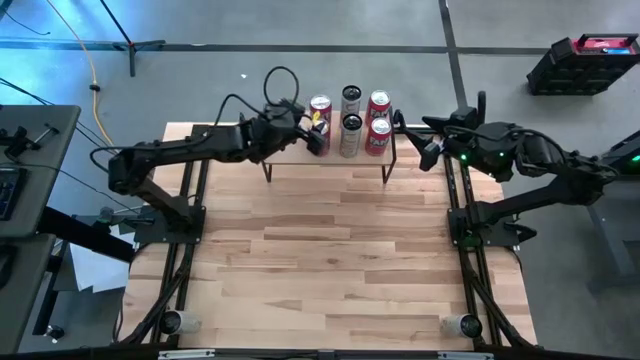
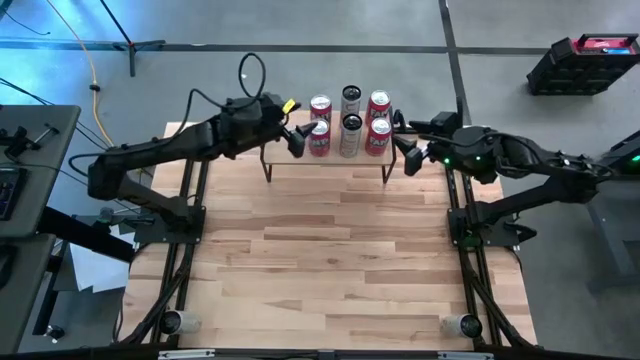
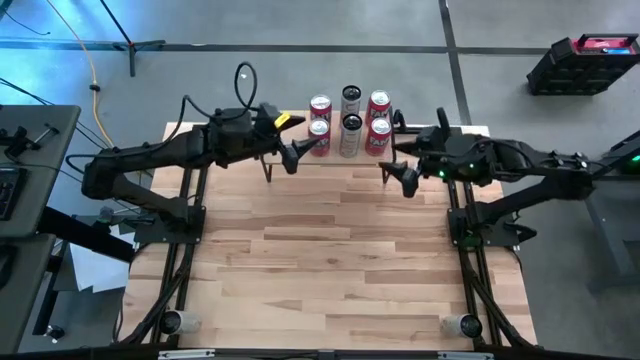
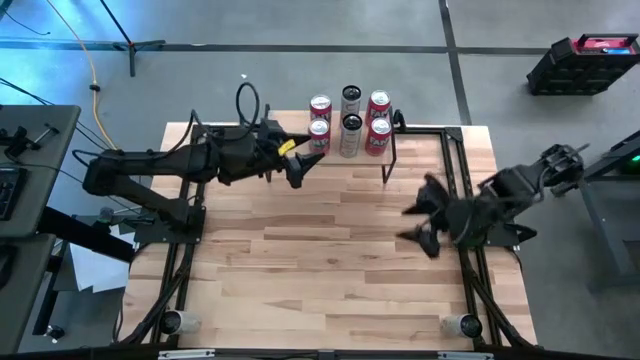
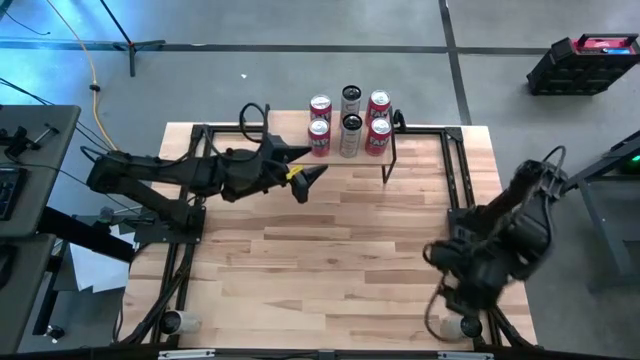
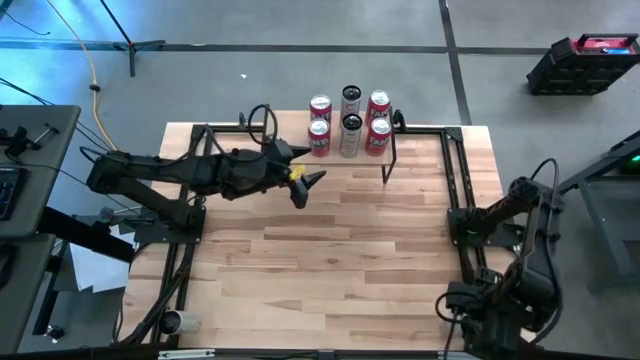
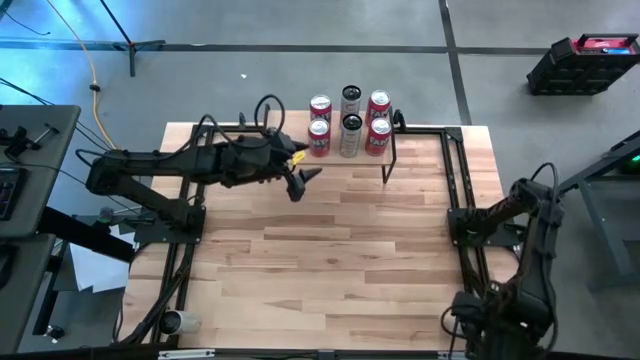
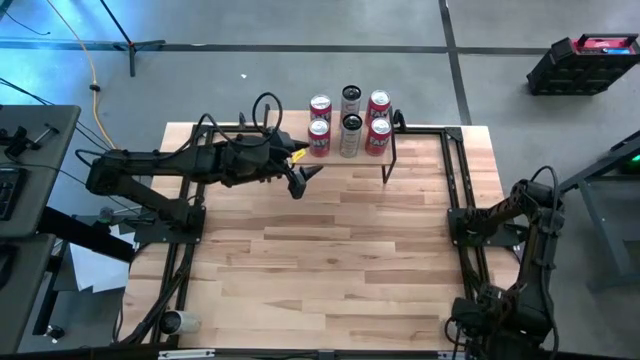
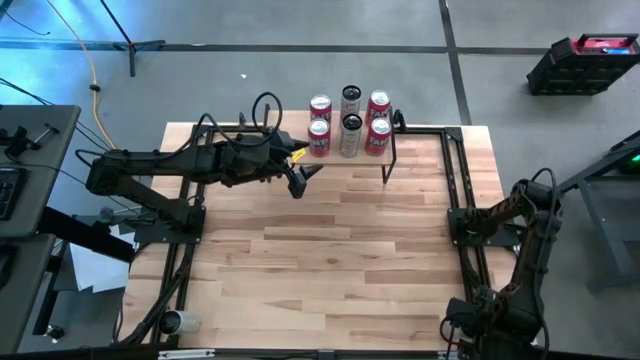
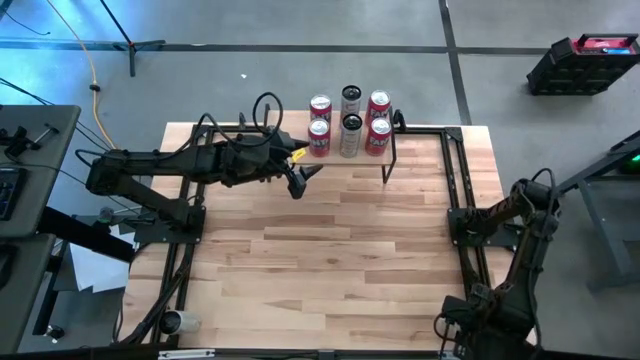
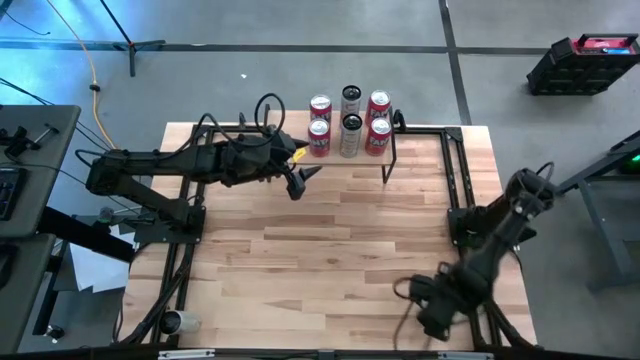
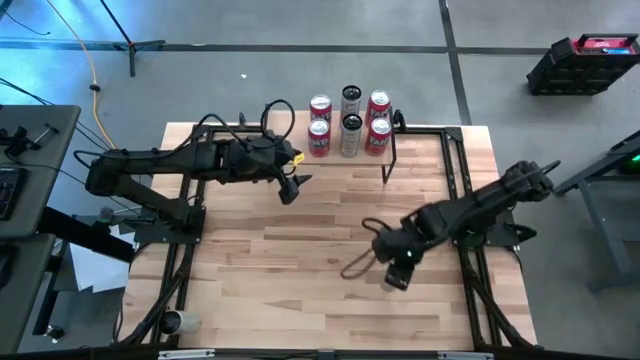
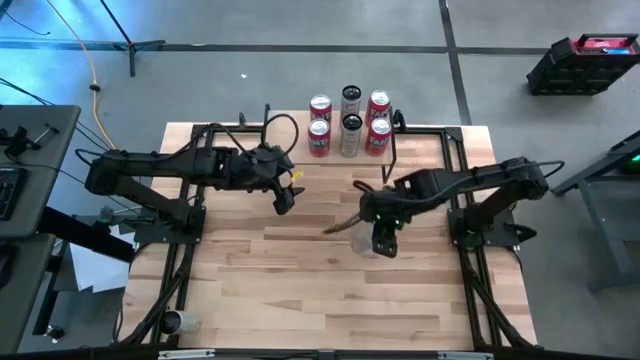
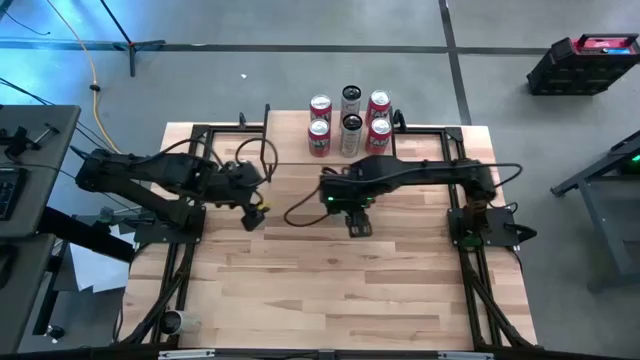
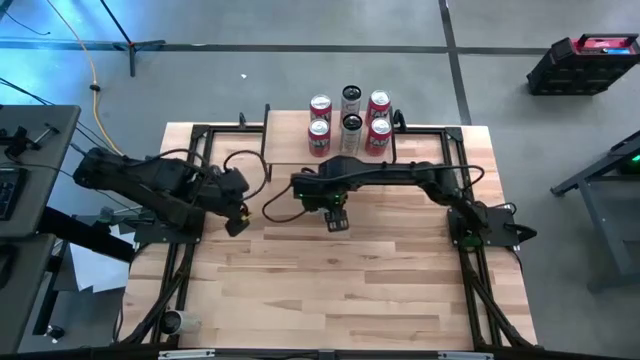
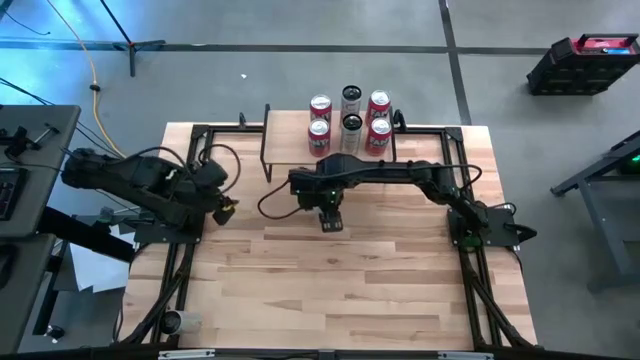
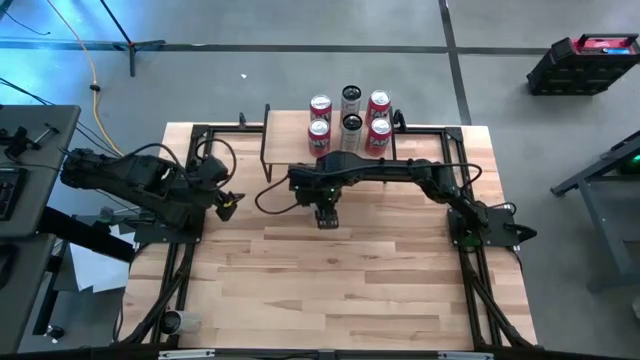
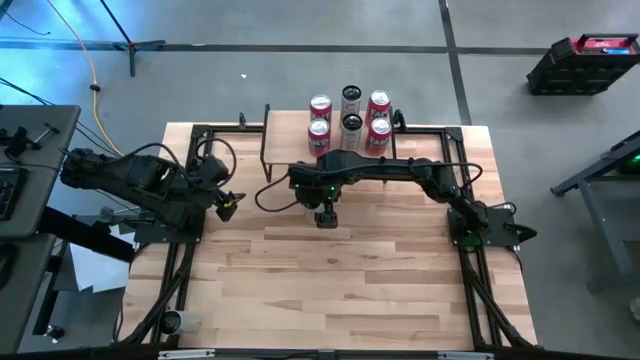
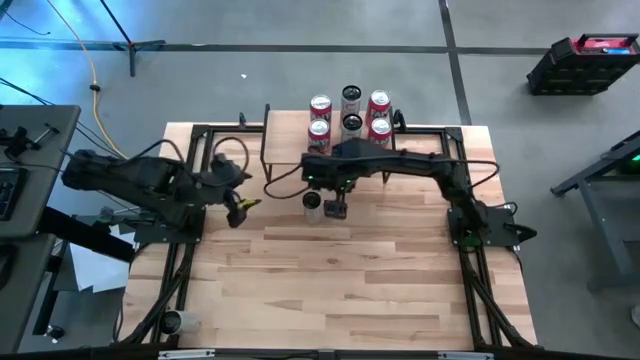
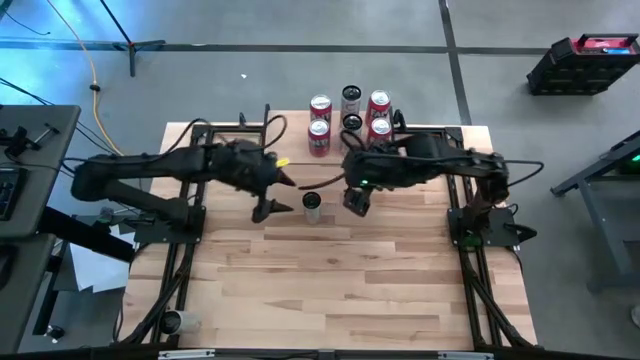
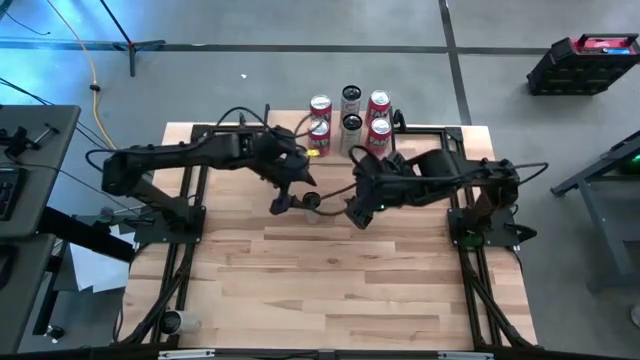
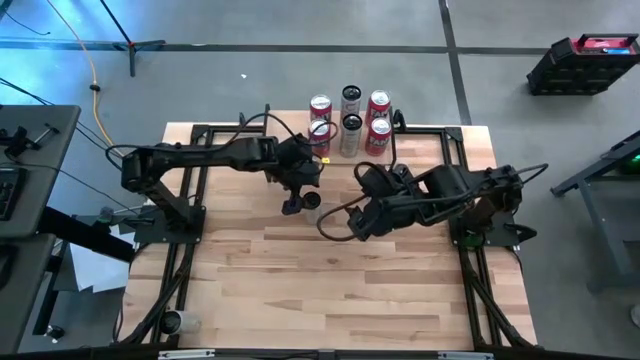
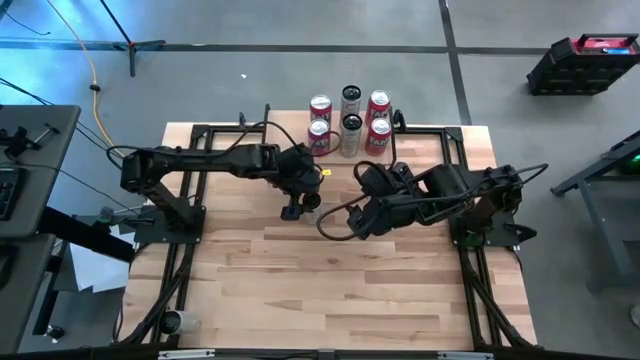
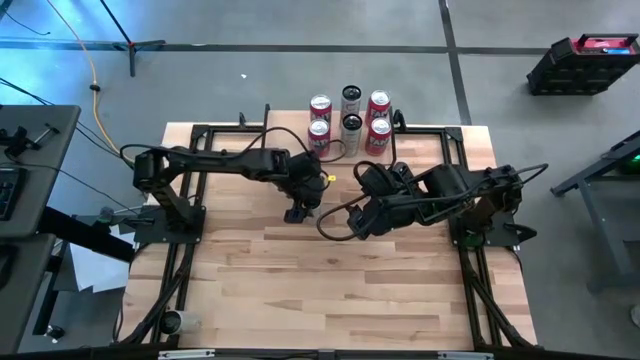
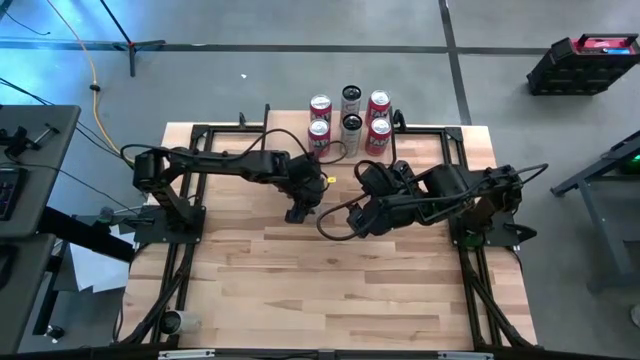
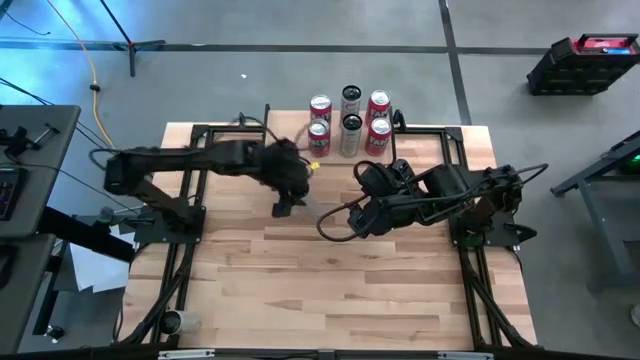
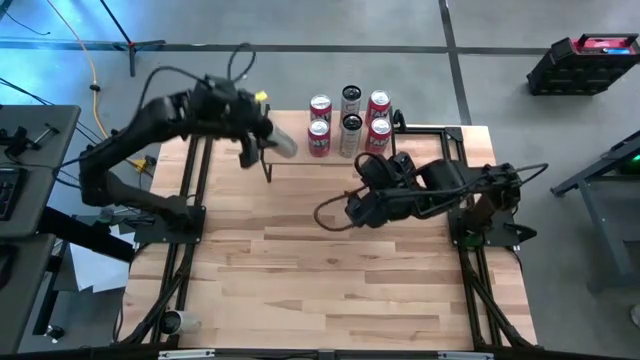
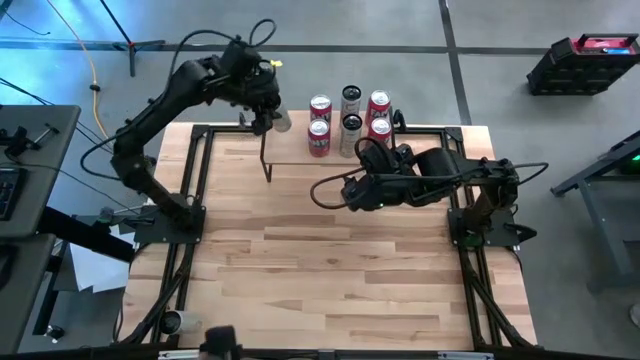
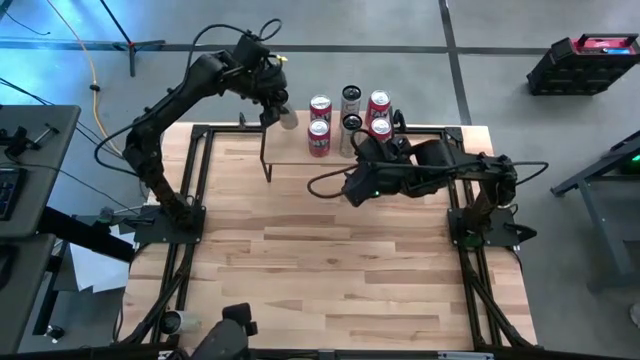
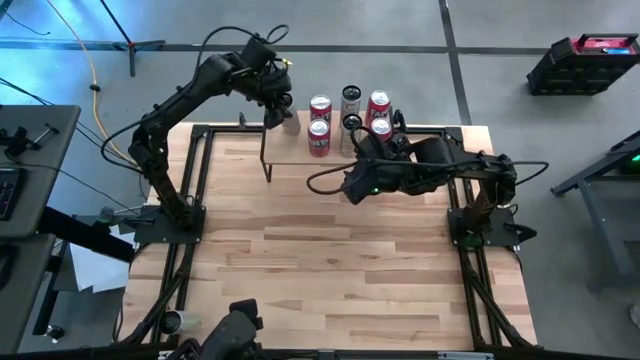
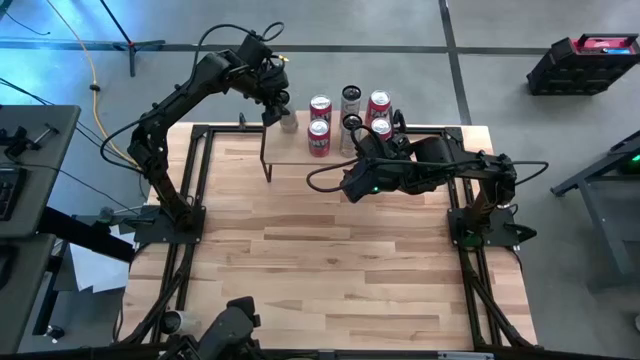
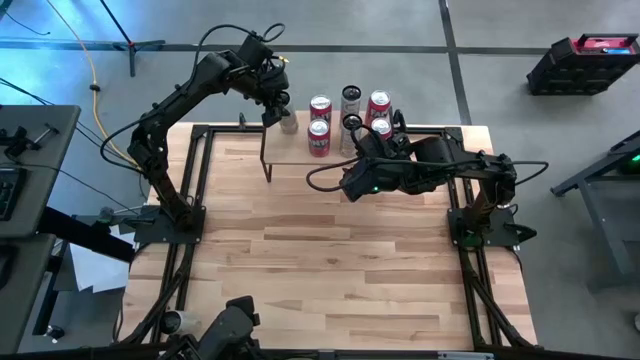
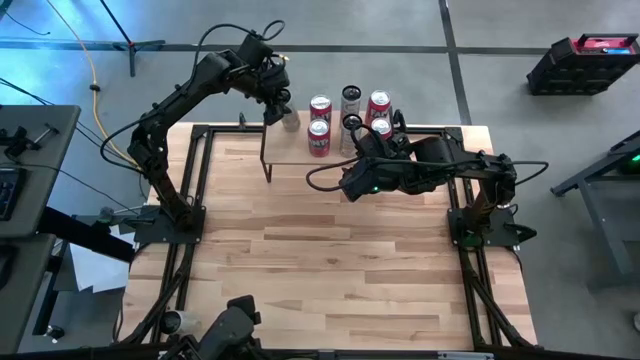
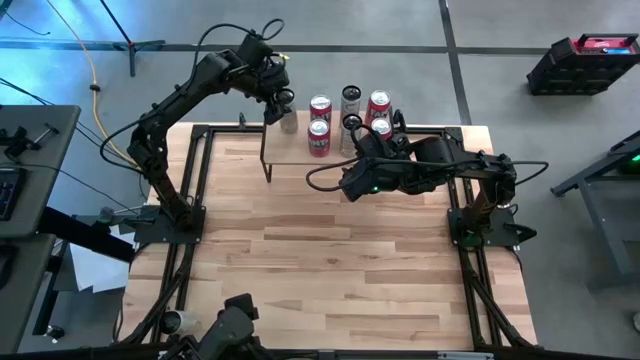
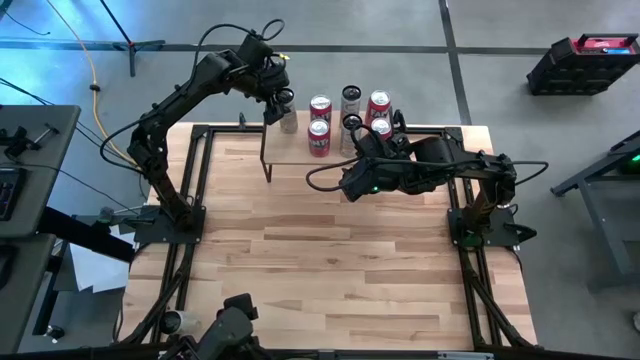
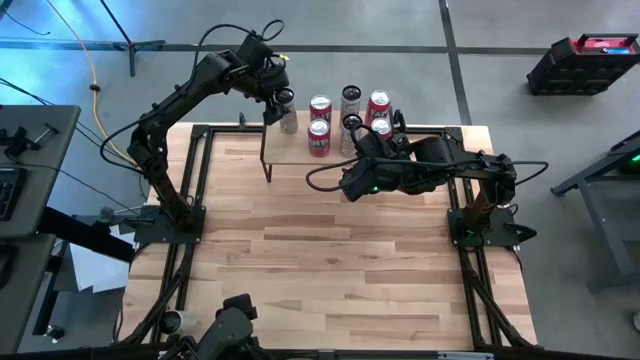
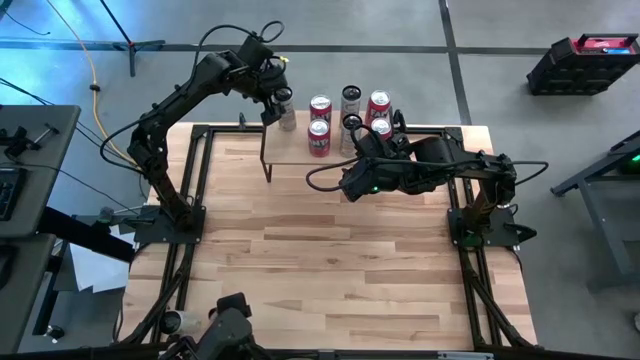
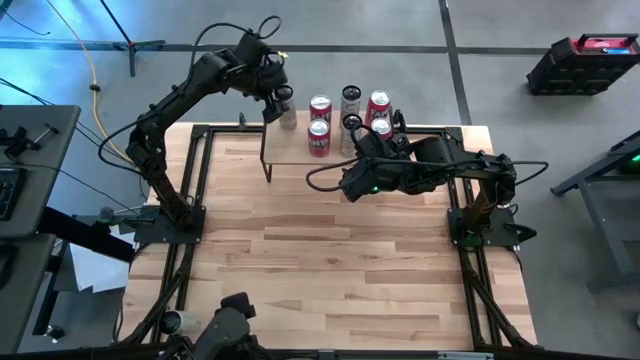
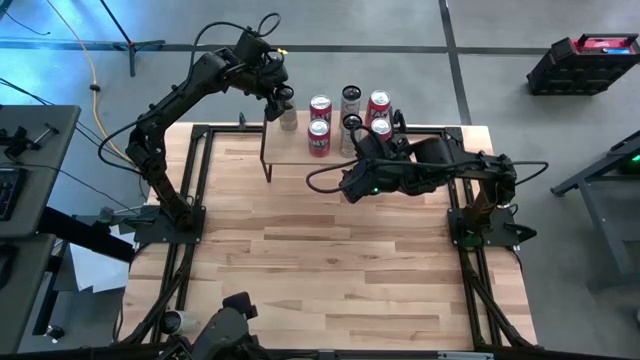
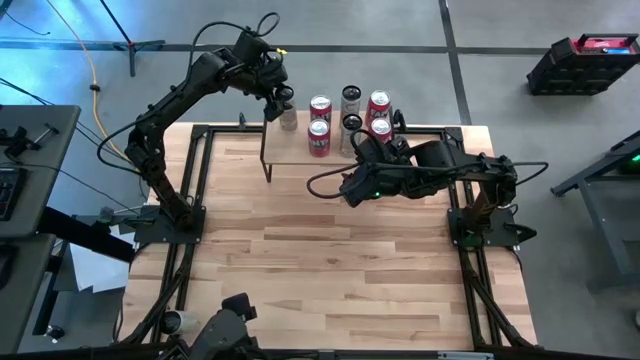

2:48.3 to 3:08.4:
Task: Place canned beverage on shelf
Put the right white soda can on the shelf

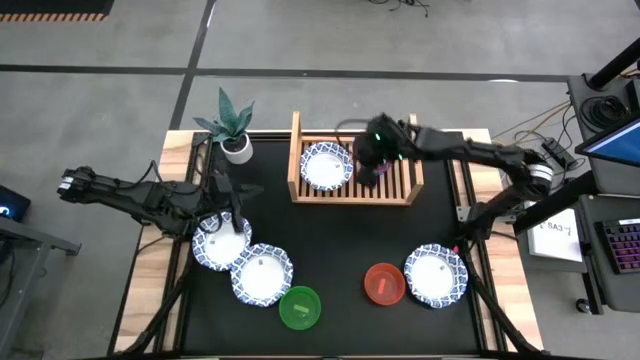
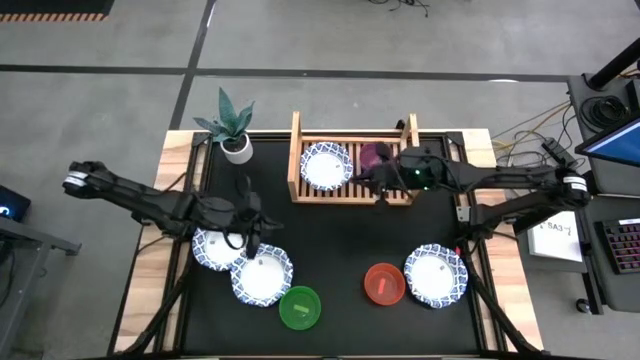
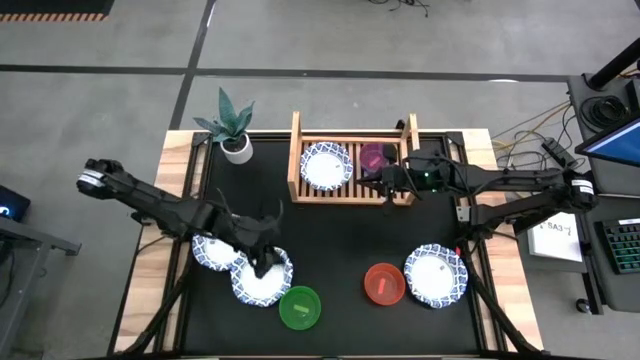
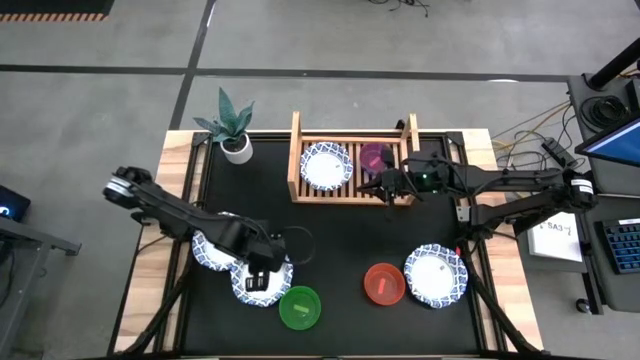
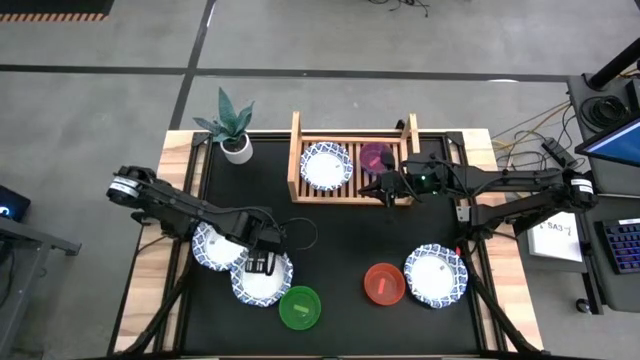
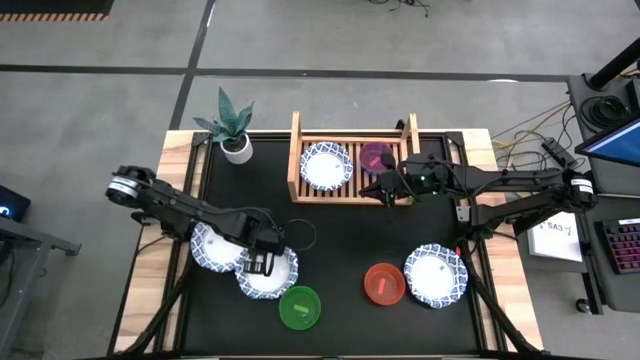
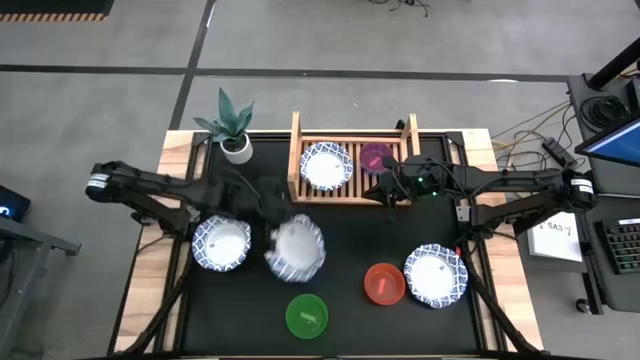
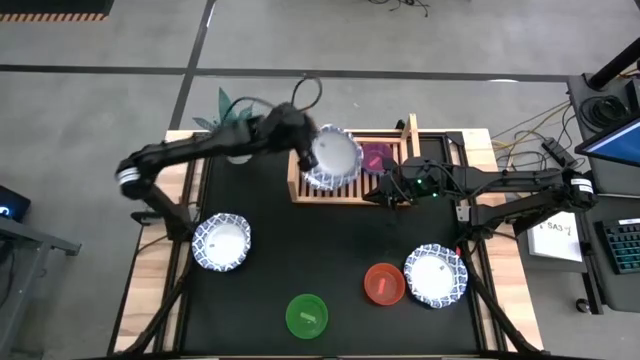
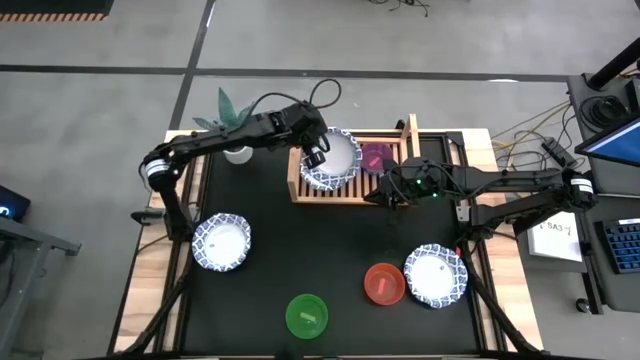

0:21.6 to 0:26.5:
Task: Place and stack bowls onto a shelf
Stack the blue patterned bowl on top of the blue patterned bowl on the shelf
